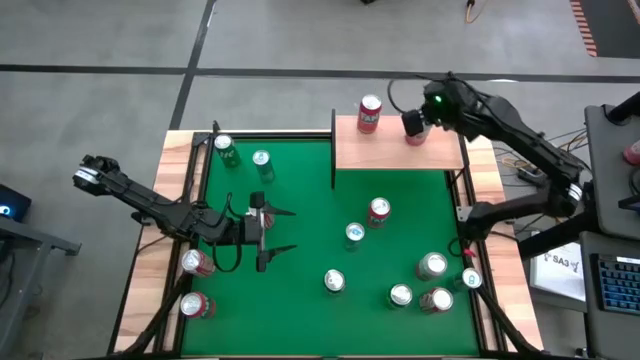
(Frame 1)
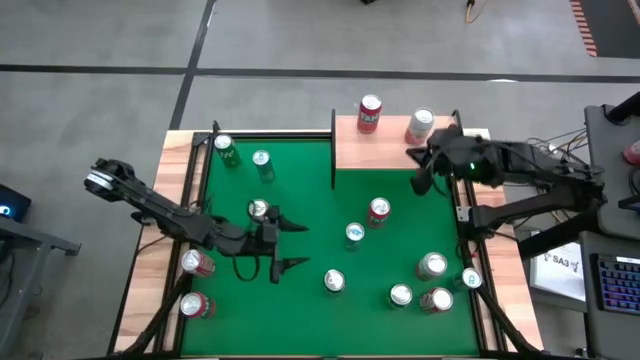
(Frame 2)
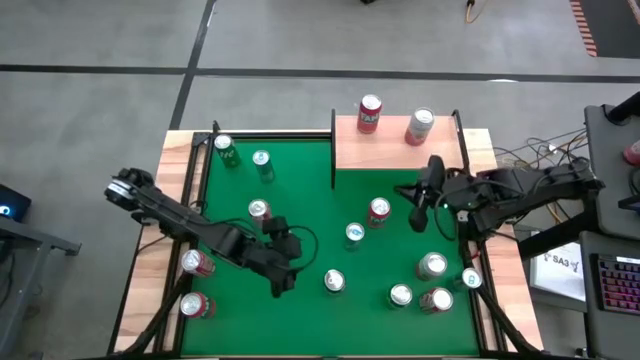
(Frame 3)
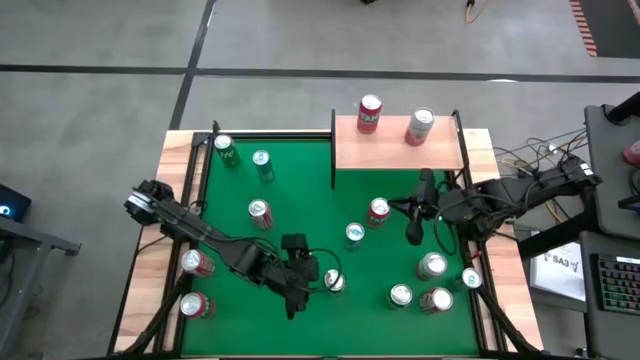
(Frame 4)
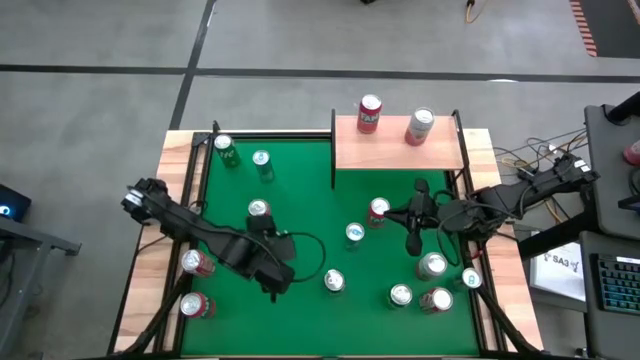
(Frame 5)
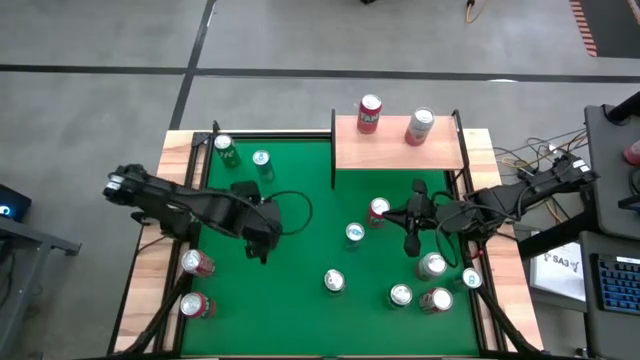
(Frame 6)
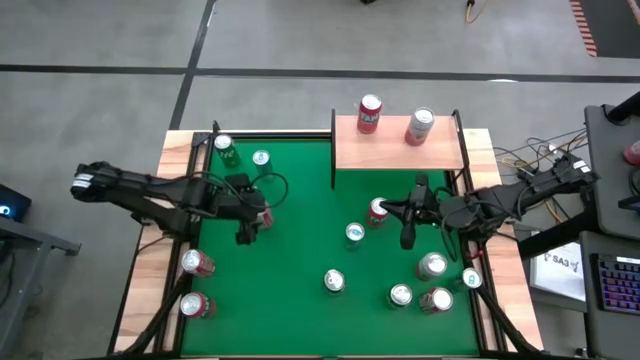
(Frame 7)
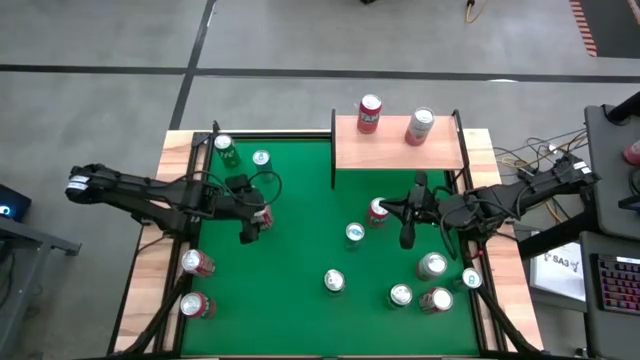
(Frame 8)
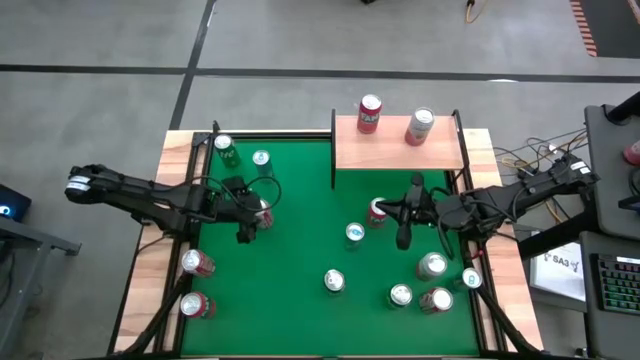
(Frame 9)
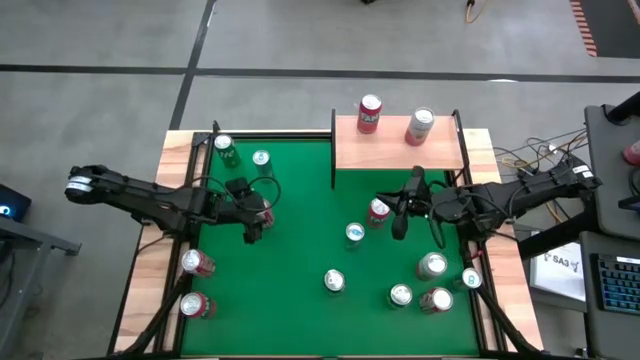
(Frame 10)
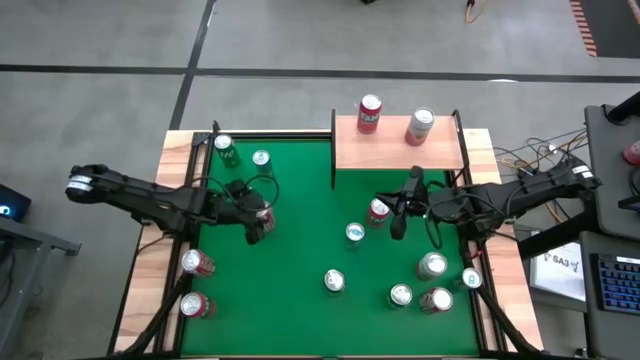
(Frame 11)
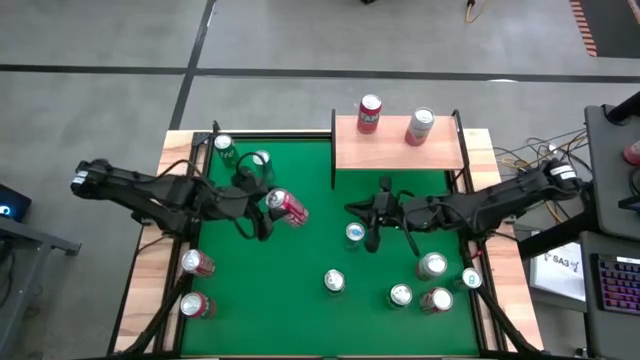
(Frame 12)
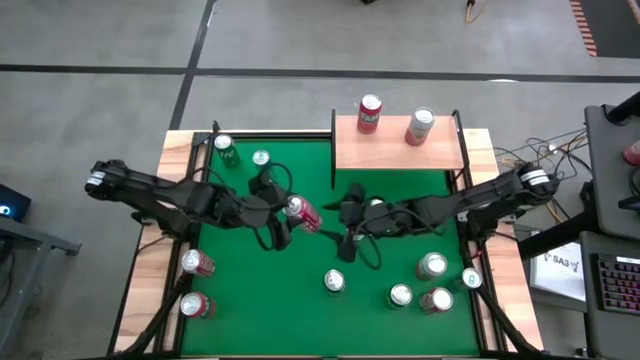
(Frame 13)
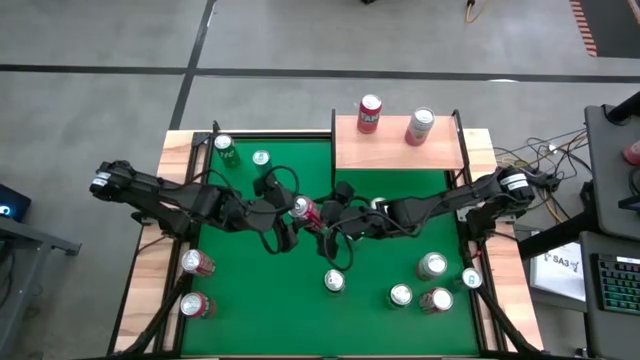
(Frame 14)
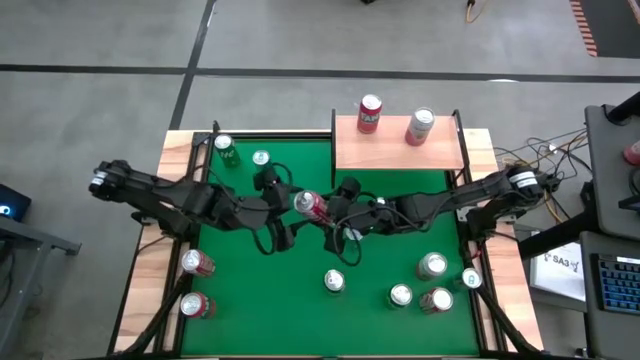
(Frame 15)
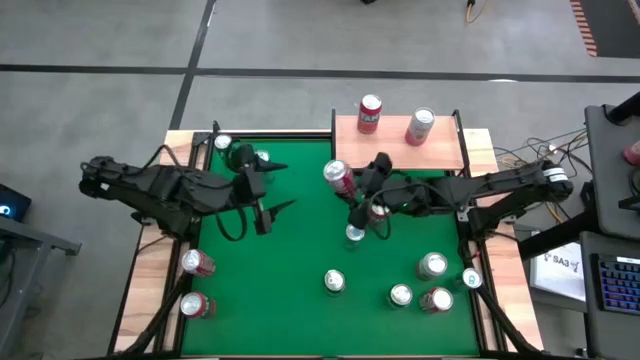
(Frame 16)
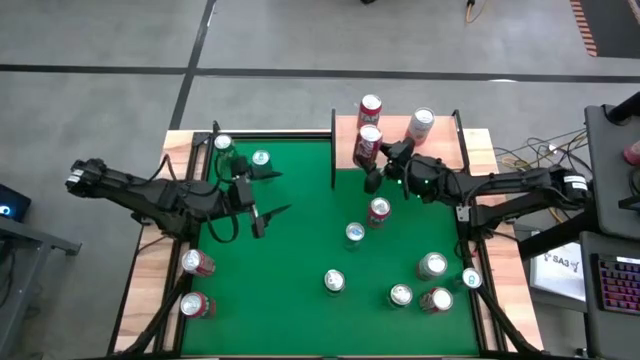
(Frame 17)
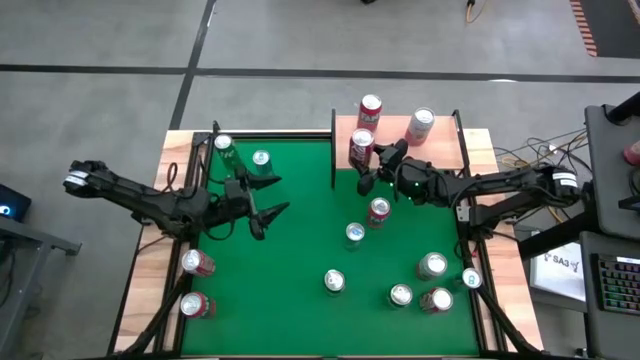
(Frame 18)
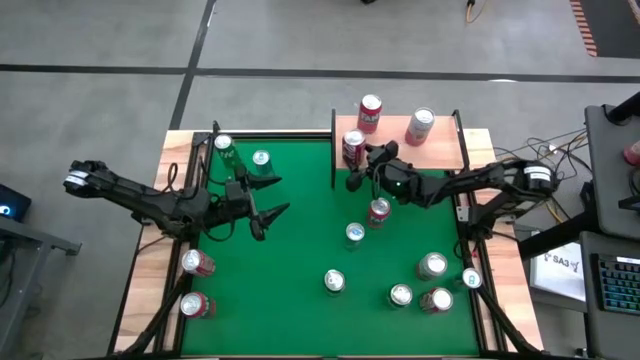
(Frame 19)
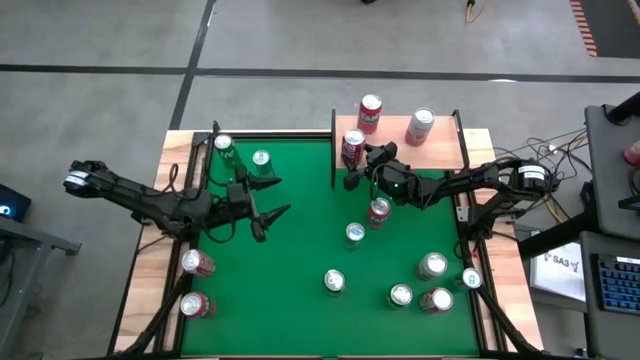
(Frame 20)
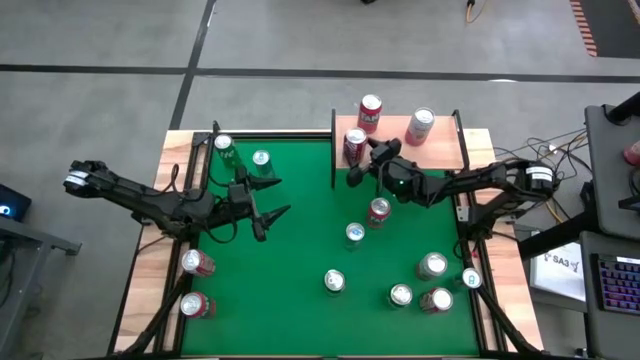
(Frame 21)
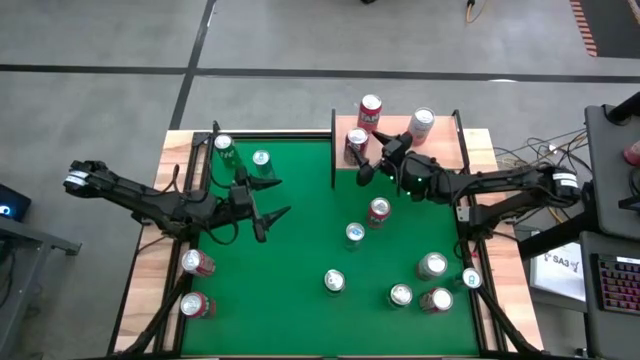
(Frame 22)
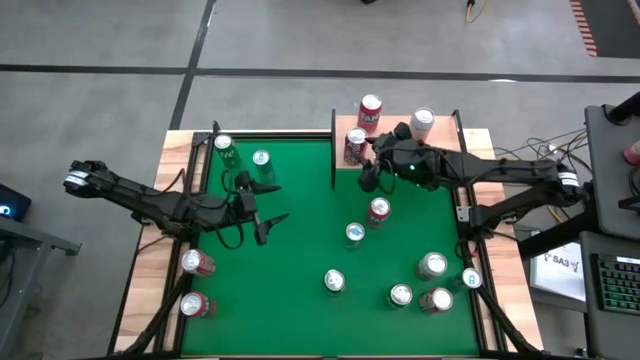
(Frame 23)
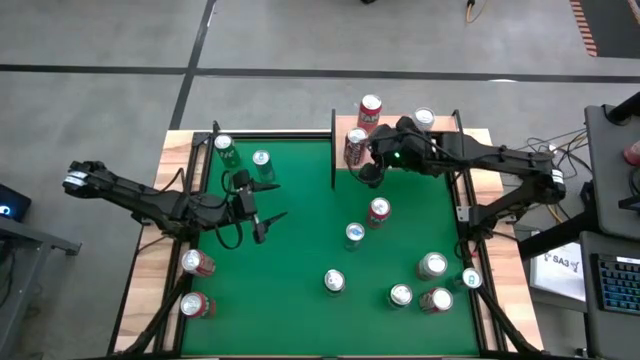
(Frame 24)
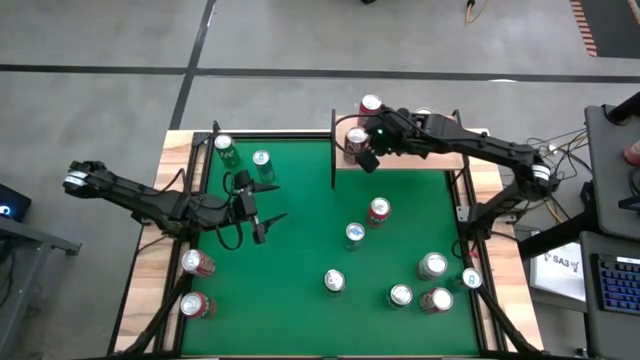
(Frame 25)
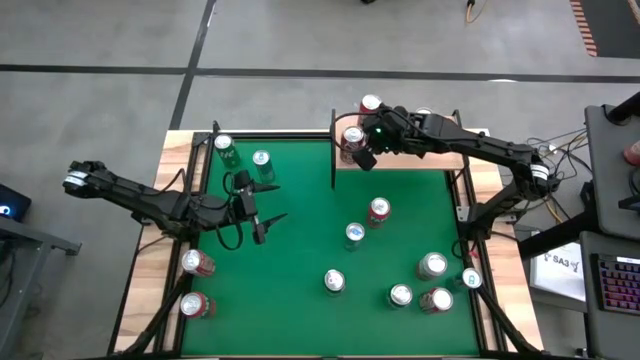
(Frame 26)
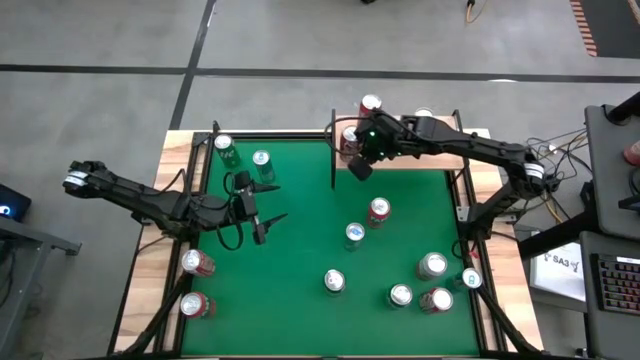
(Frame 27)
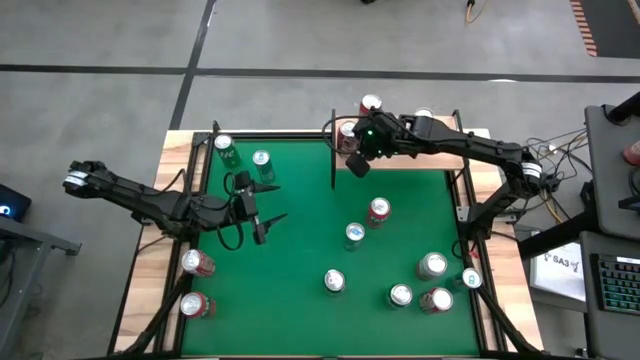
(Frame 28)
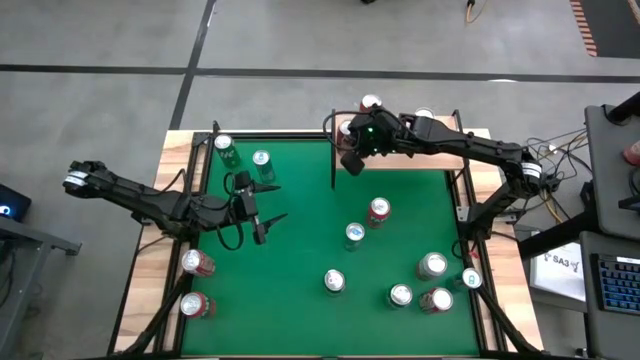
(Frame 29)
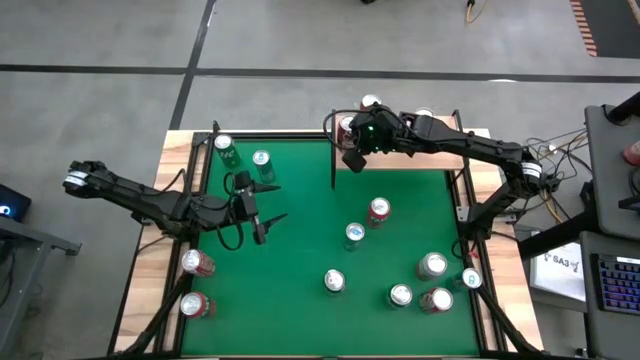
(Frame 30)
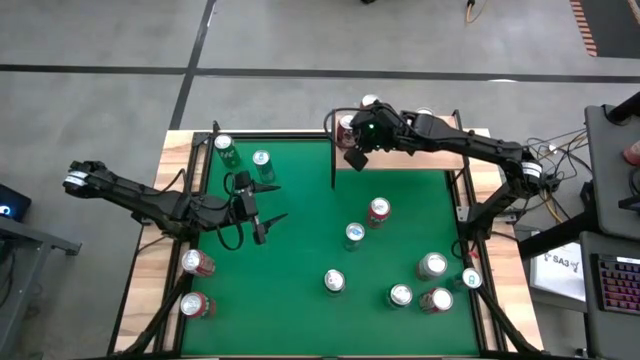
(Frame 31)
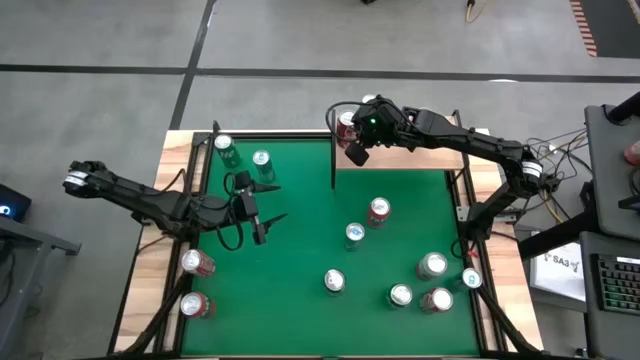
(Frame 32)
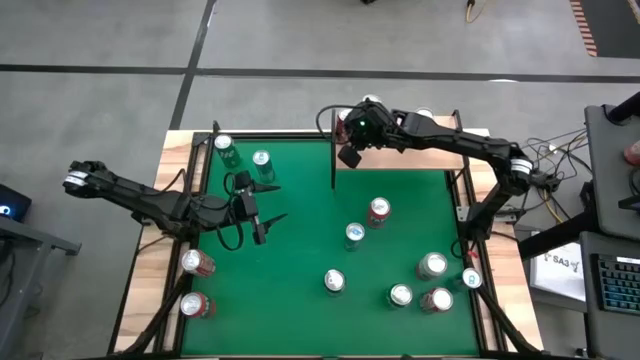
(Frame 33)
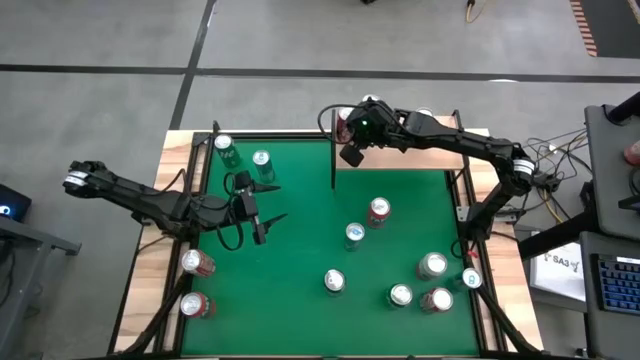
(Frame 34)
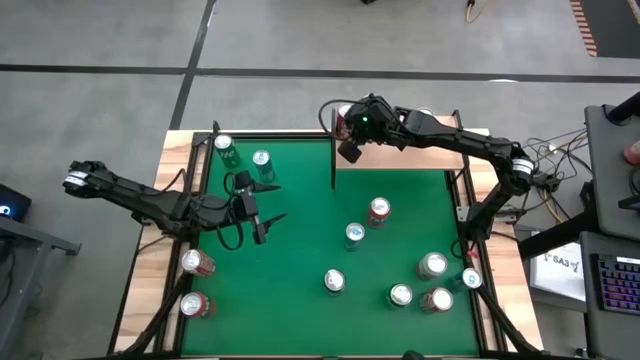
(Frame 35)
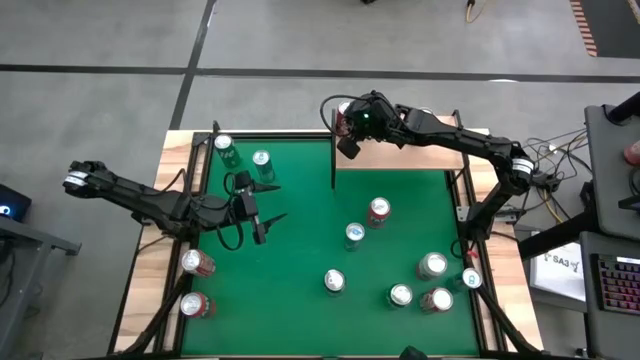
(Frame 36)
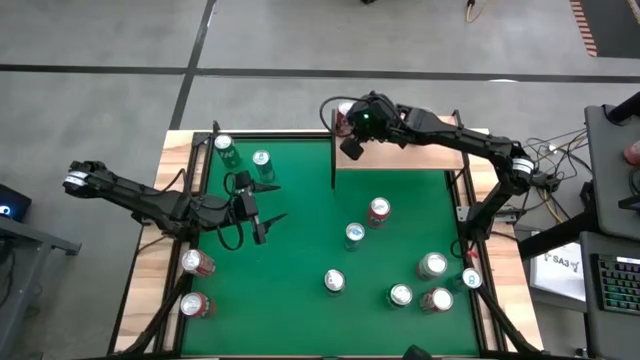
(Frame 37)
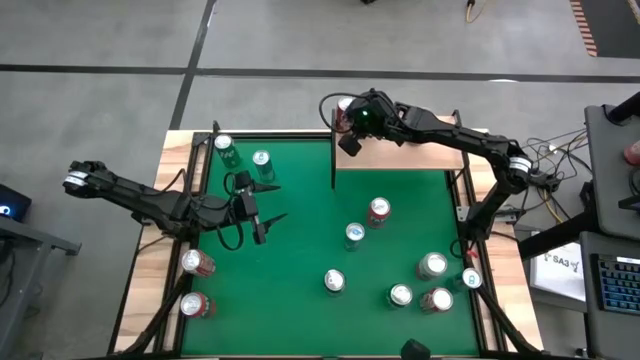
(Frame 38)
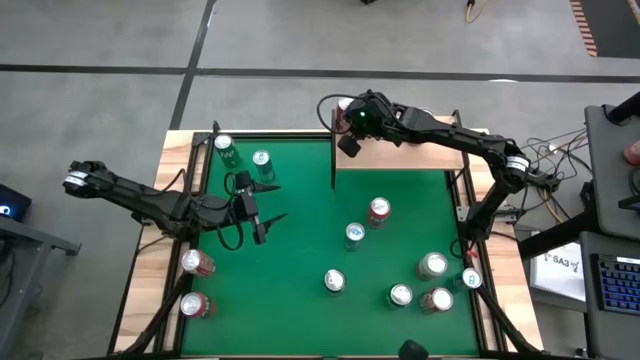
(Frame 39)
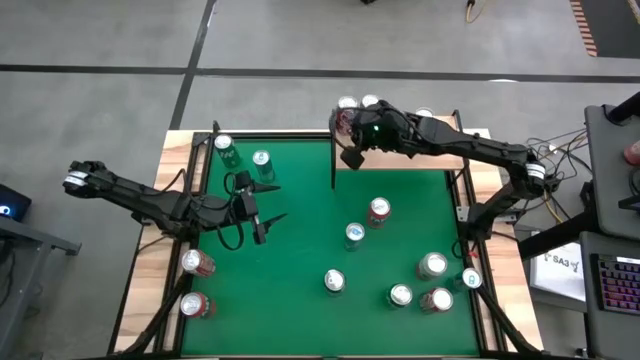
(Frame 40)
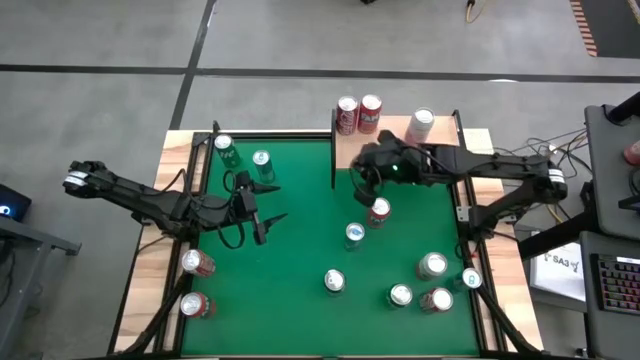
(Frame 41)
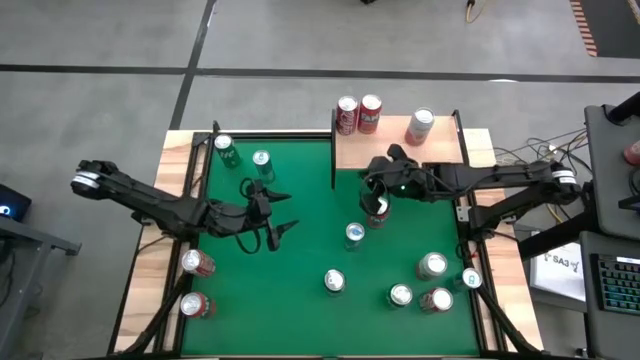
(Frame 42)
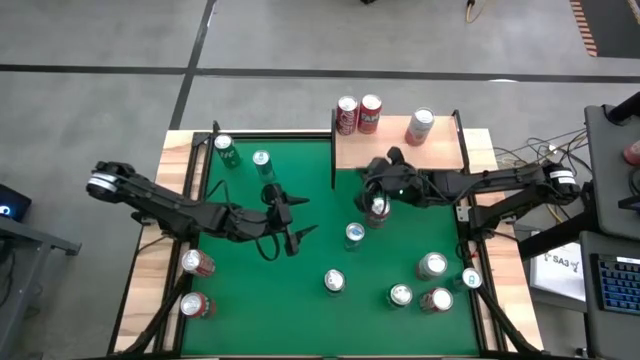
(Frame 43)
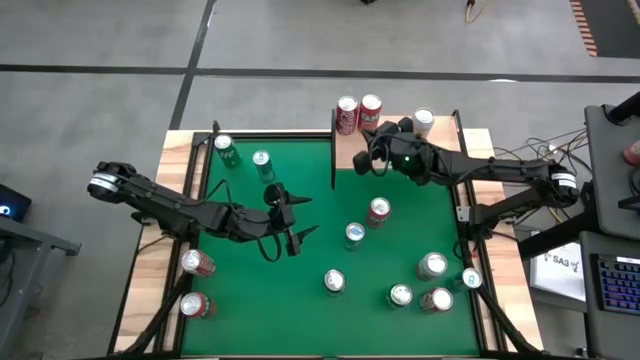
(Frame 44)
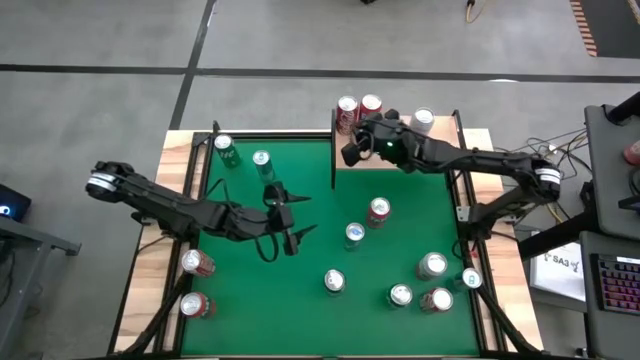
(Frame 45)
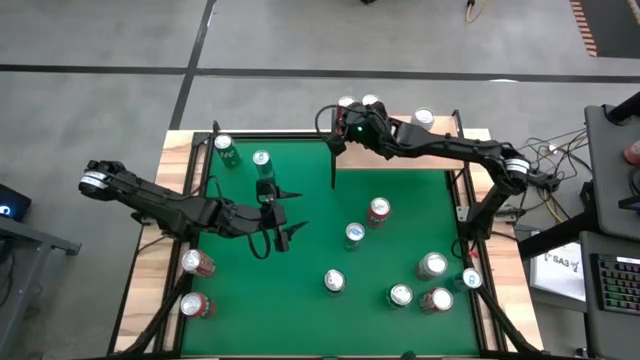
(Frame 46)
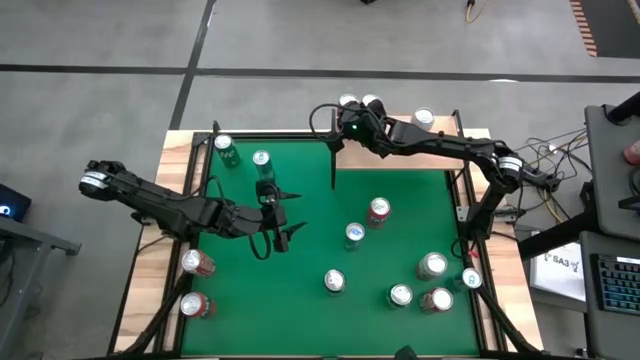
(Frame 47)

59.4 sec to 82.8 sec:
Task: Place canned beverage on shelf
Put the top red-white soda can on the shelf
